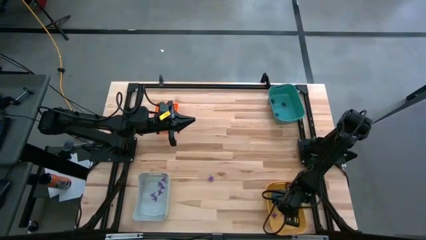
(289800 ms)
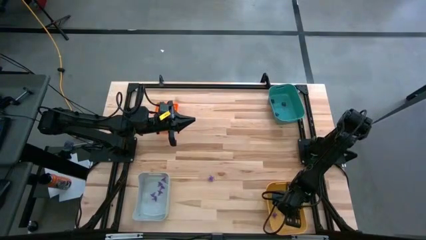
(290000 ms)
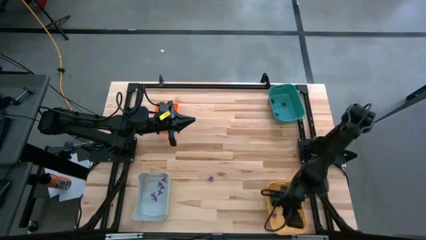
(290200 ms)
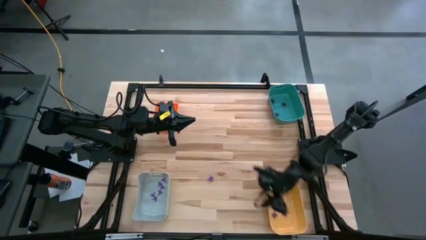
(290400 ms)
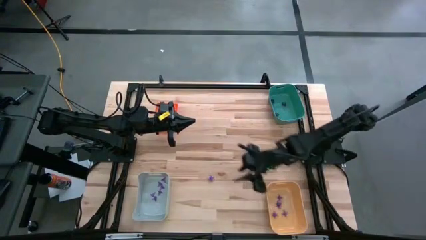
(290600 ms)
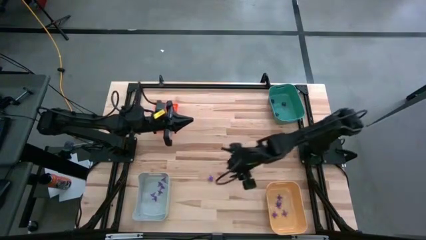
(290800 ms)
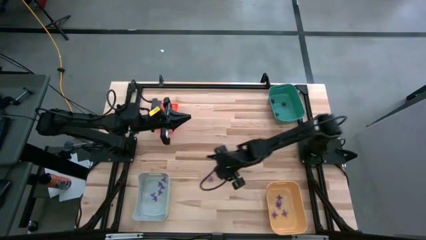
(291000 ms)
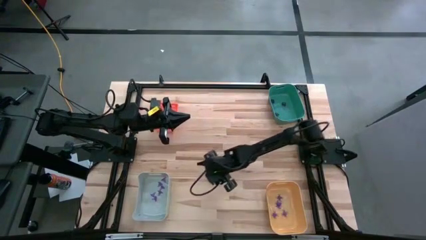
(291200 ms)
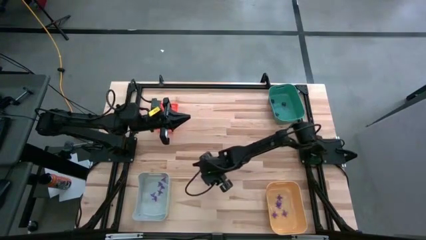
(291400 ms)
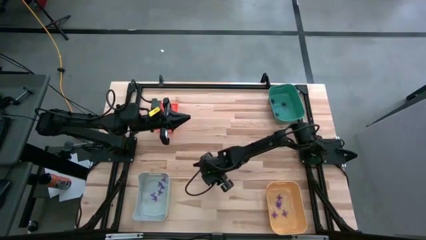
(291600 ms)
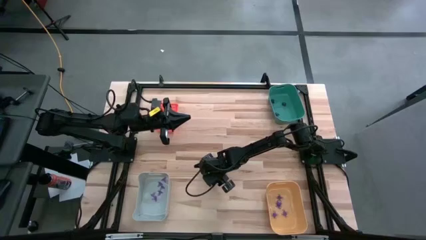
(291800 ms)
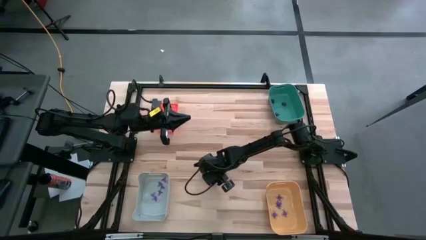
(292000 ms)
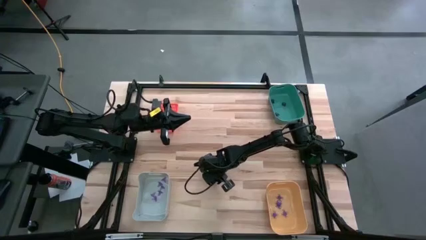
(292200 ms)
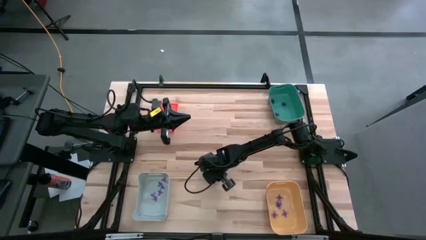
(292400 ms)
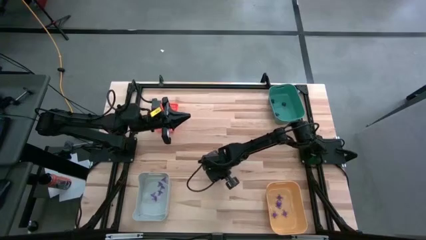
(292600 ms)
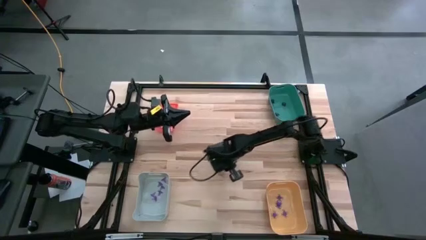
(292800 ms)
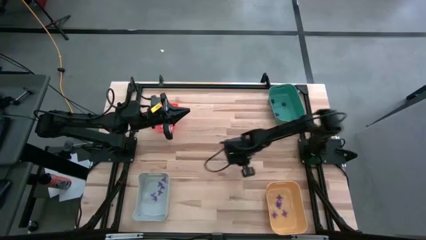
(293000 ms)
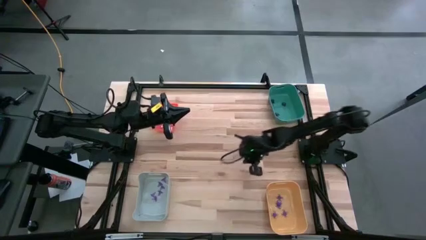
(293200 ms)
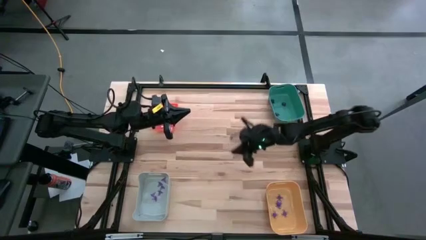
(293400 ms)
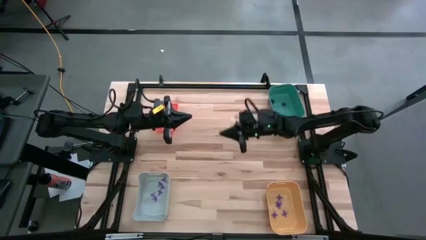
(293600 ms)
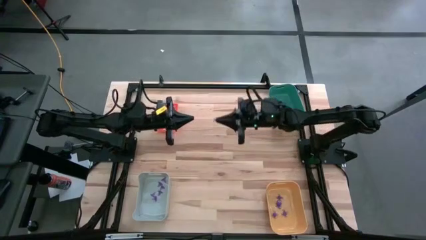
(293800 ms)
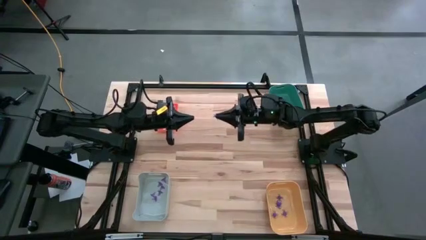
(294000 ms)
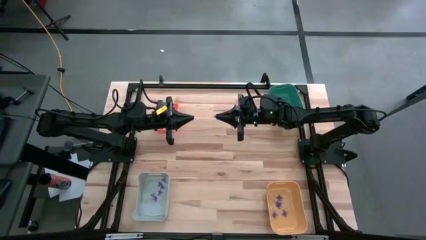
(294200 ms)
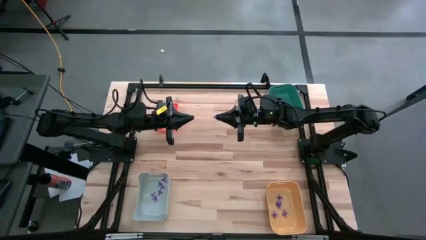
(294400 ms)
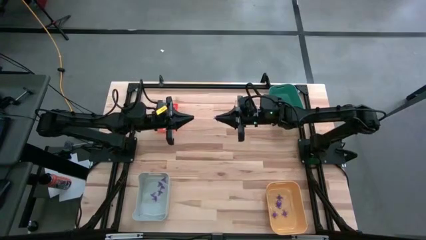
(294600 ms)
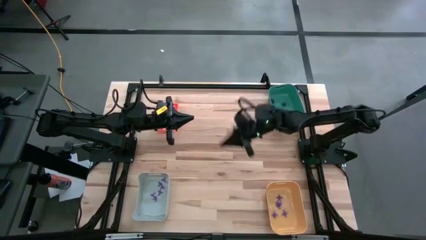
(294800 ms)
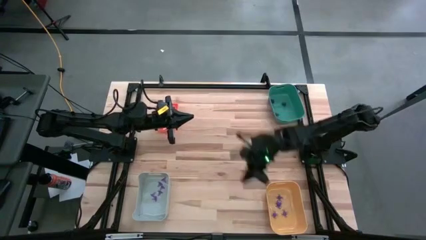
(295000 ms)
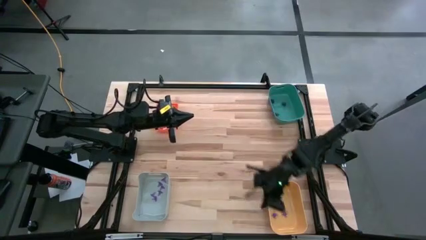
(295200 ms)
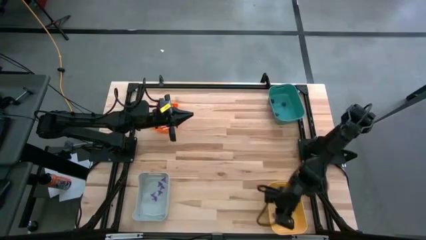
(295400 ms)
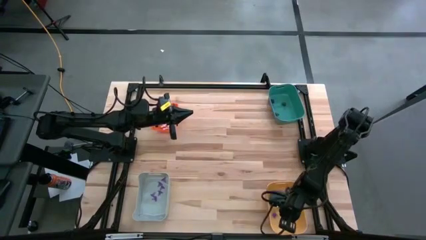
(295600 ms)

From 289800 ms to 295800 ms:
Task: Sort Halloween decoration
Put the violet spider toy into the yellow bin

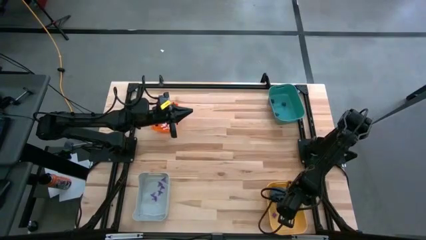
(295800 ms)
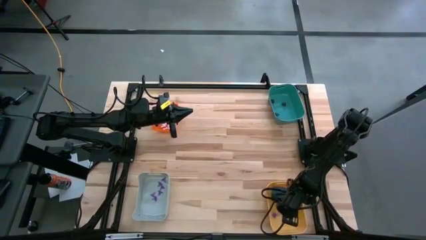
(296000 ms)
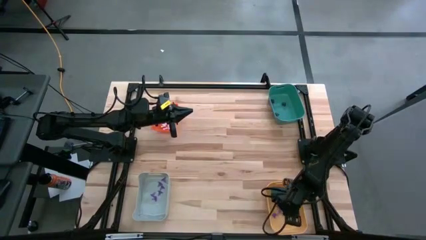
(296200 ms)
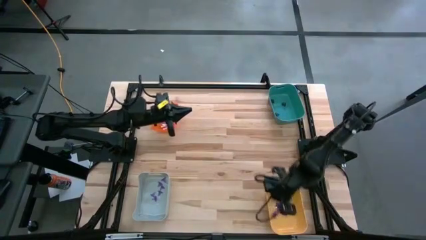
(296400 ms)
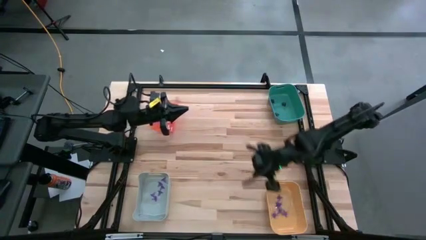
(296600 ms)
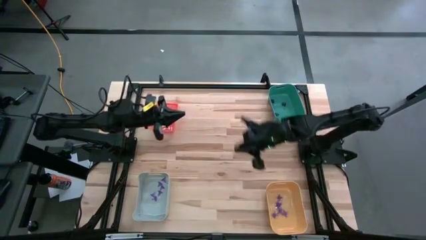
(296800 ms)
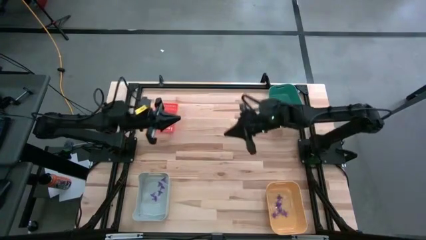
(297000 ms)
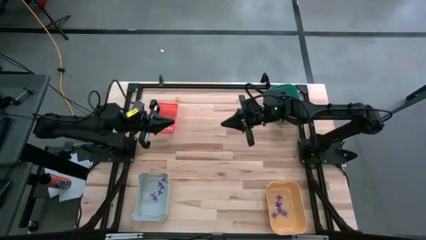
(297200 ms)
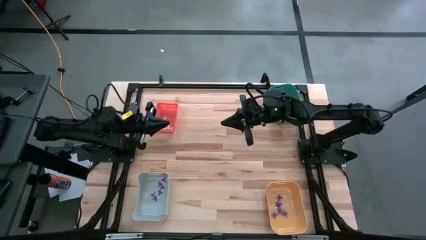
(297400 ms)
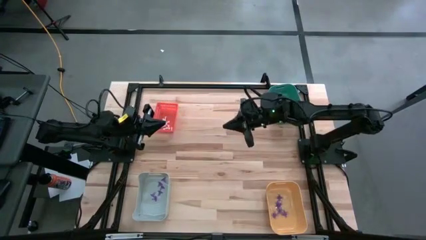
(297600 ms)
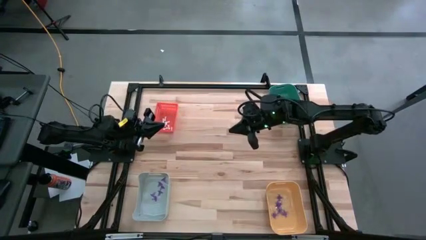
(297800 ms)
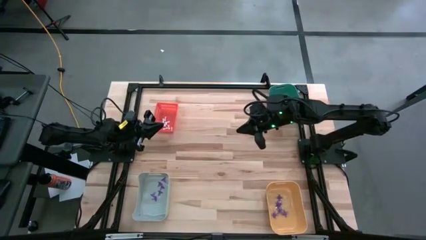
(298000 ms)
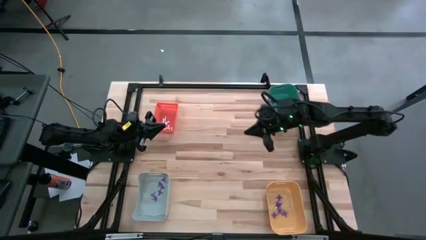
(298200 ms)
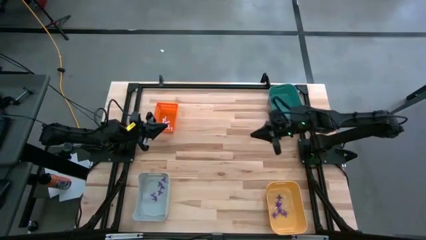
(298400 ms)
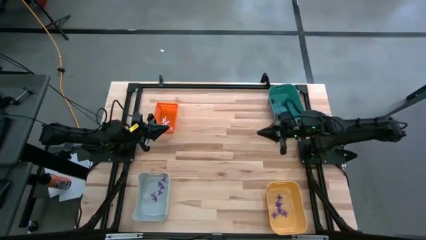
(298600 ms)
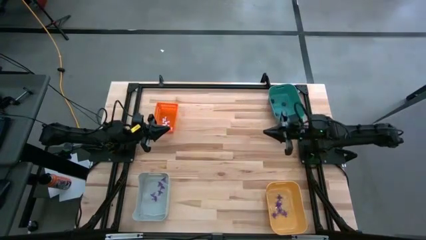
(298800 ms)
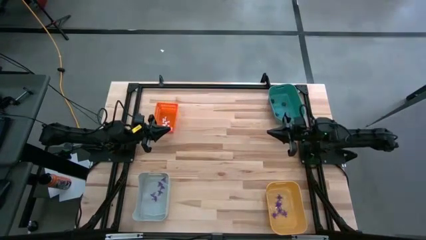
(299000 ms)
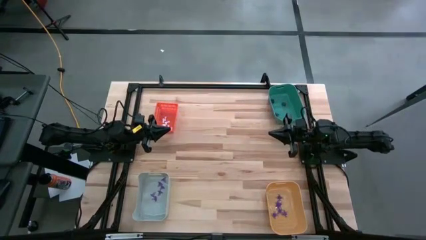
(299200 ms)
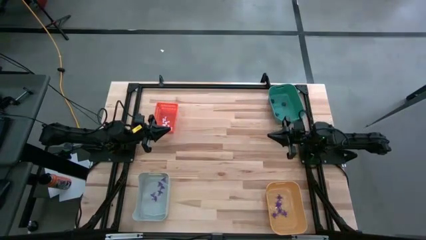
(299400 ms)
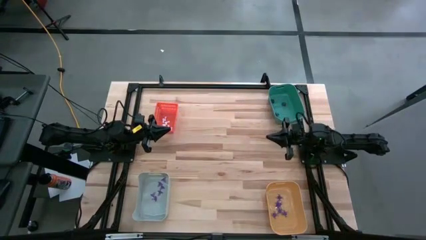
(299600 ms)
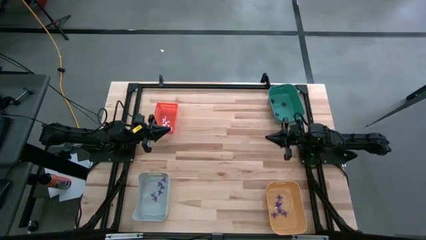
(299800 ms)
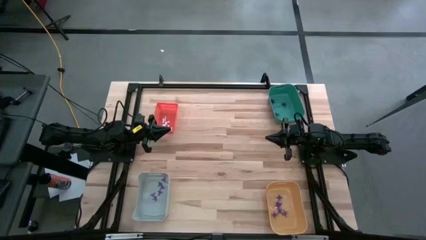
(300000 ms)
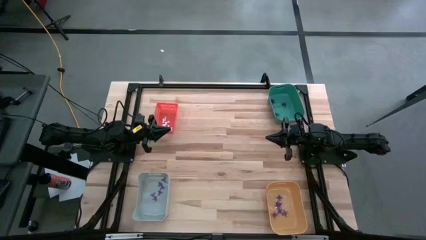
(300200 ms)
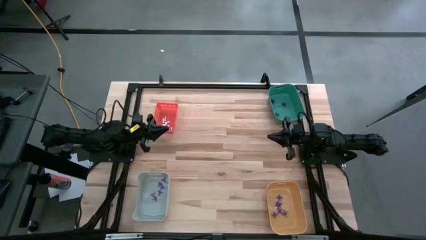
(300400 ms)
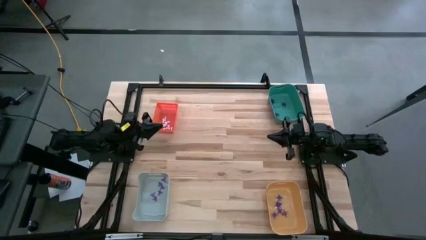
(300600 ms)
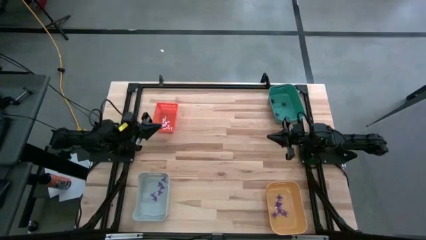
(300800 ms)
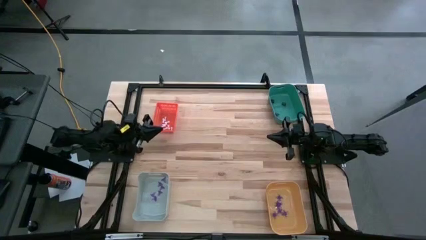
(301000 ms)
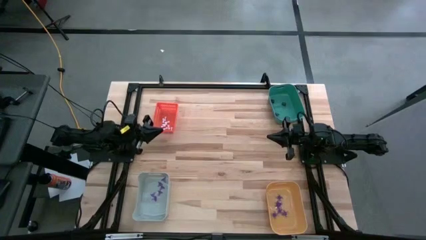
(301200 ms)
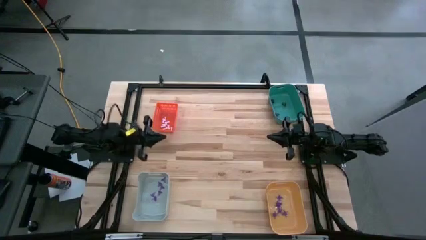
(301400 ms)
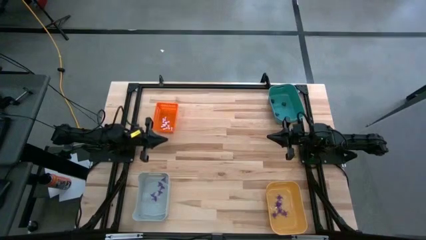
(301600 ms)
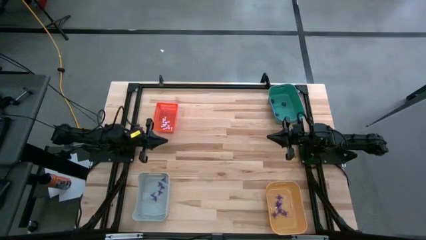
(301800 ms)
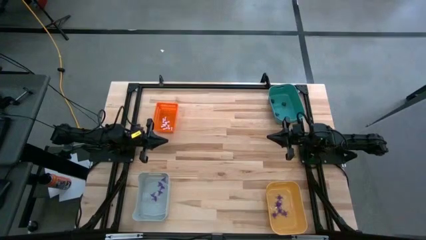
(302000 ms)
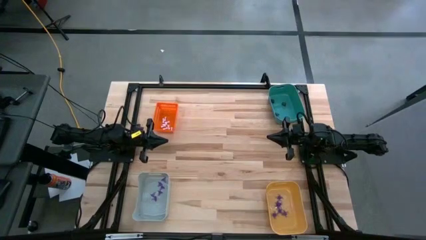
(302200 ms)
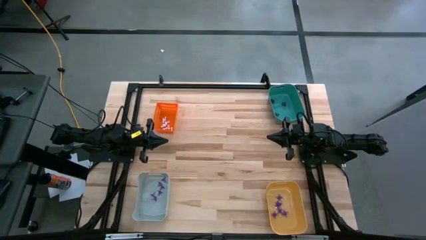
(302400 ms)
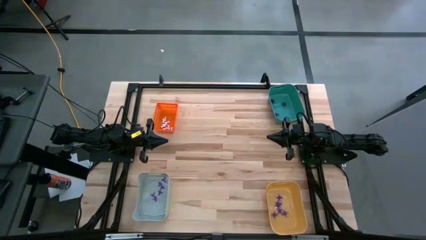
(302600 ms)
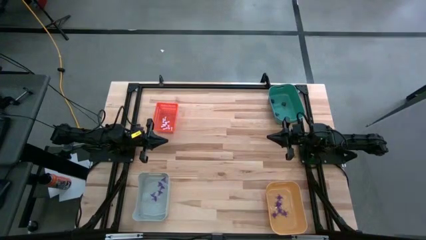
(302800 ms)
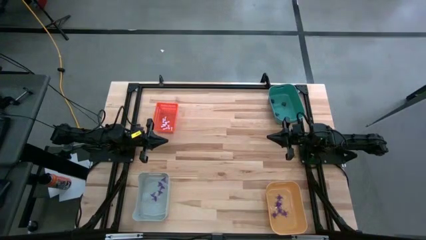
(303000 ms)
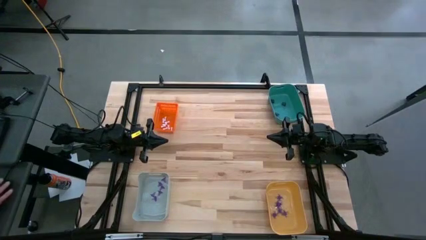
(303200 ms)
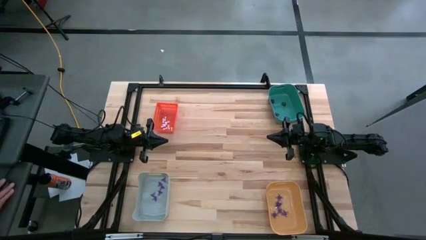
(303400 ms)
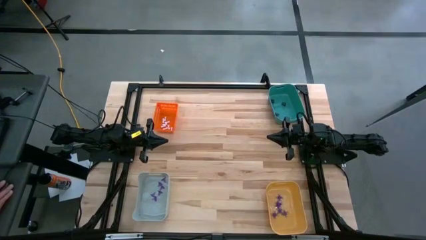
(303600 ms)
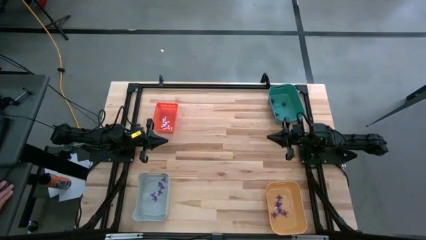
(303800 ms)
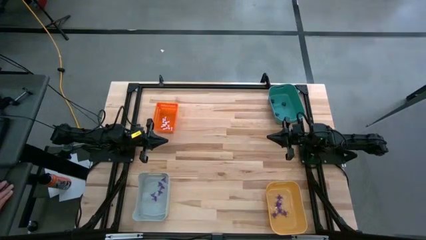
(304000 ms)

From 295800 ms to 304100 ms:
Return to Home Position
